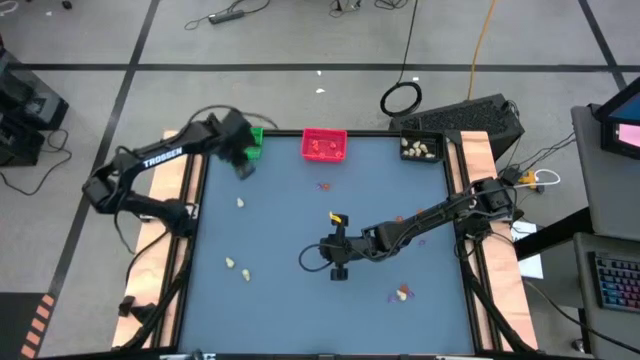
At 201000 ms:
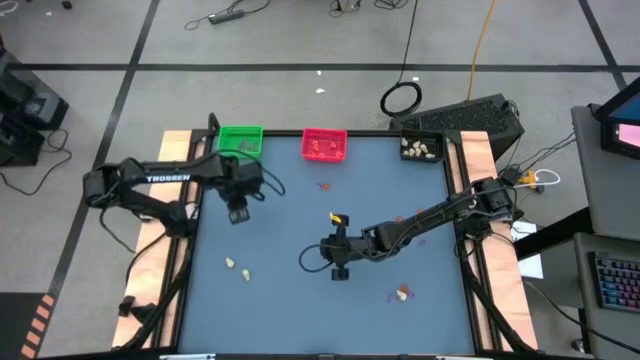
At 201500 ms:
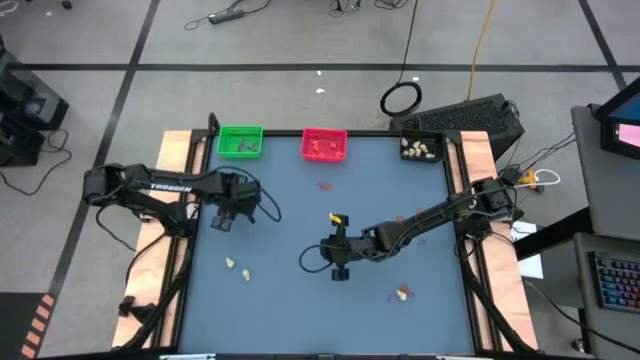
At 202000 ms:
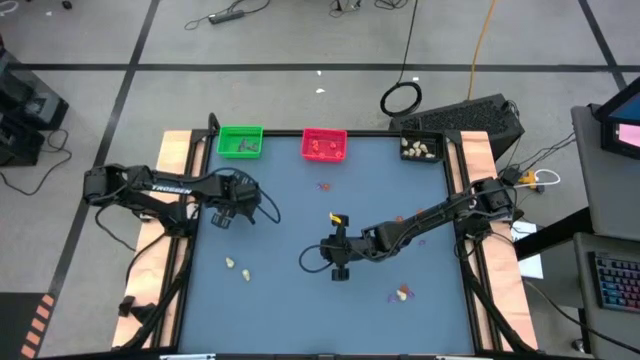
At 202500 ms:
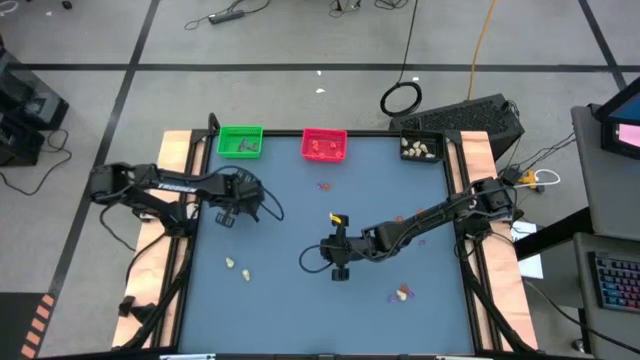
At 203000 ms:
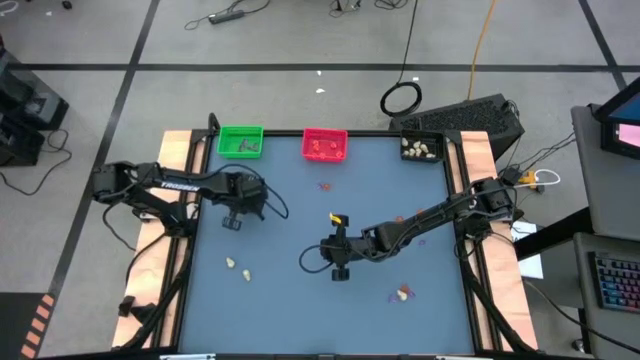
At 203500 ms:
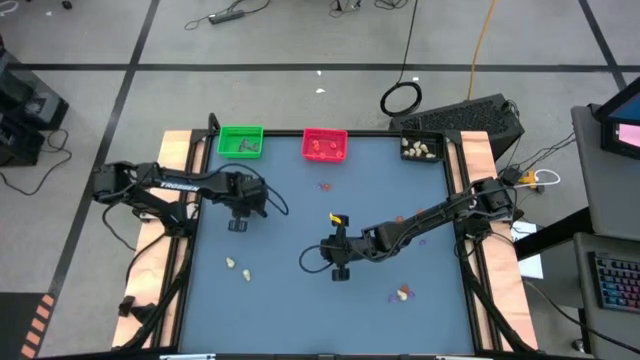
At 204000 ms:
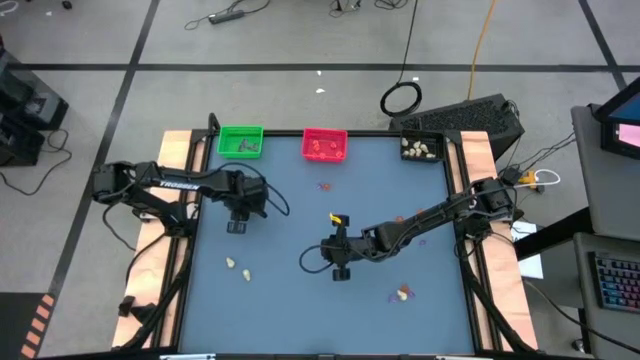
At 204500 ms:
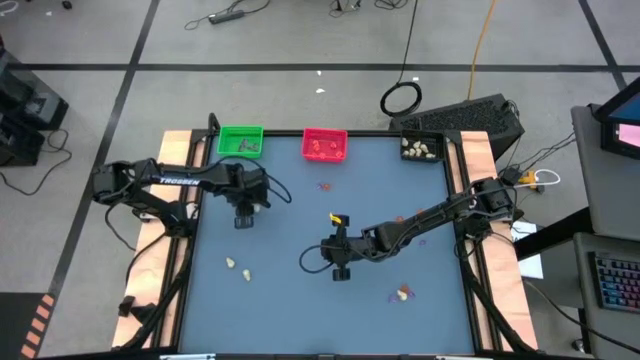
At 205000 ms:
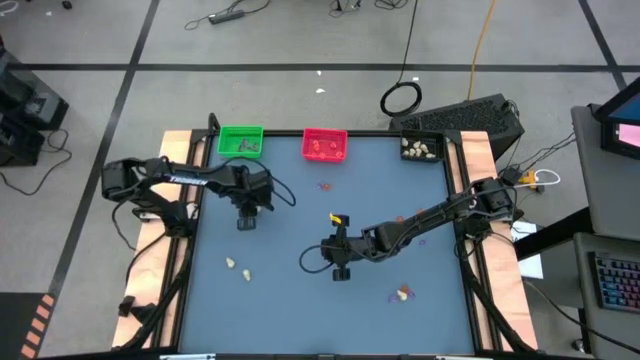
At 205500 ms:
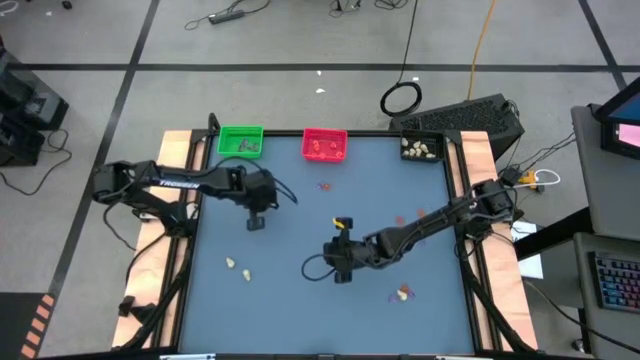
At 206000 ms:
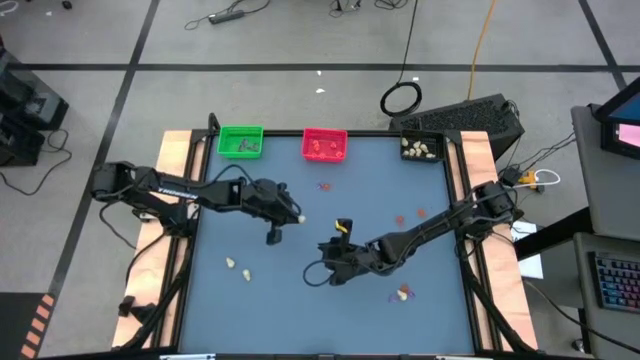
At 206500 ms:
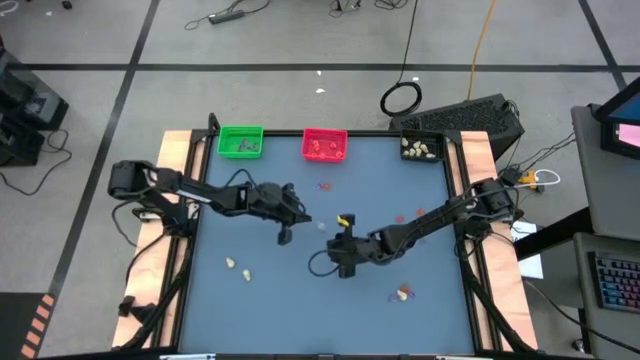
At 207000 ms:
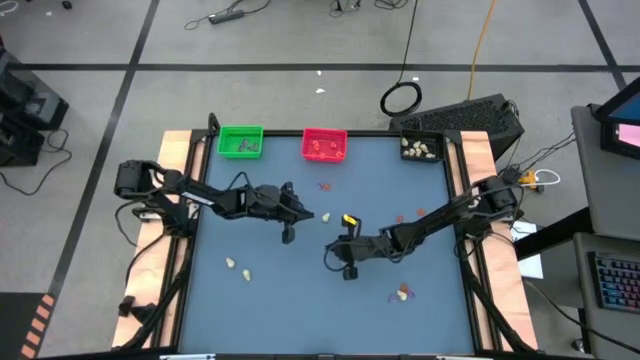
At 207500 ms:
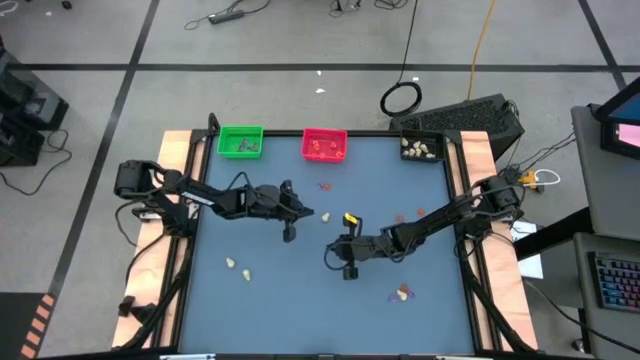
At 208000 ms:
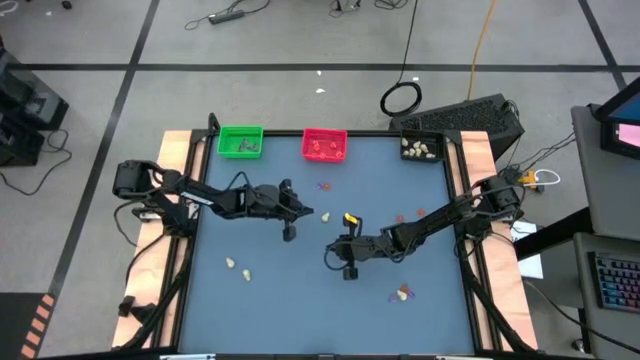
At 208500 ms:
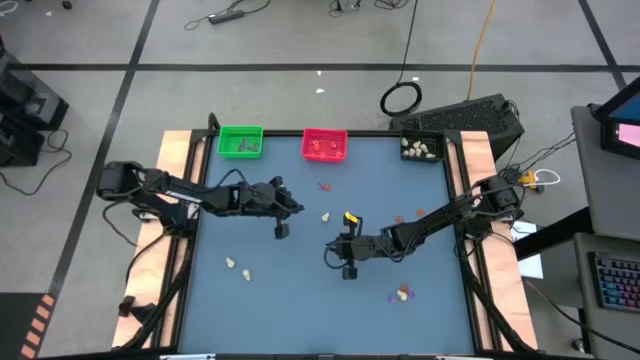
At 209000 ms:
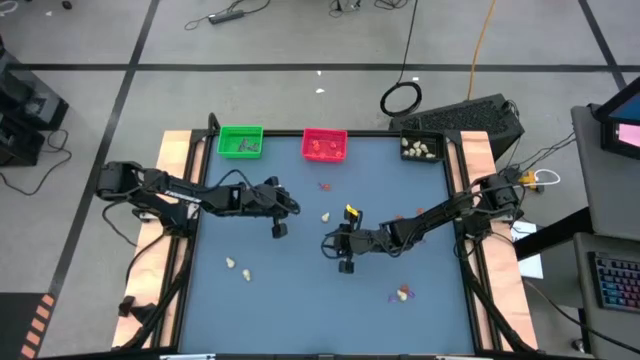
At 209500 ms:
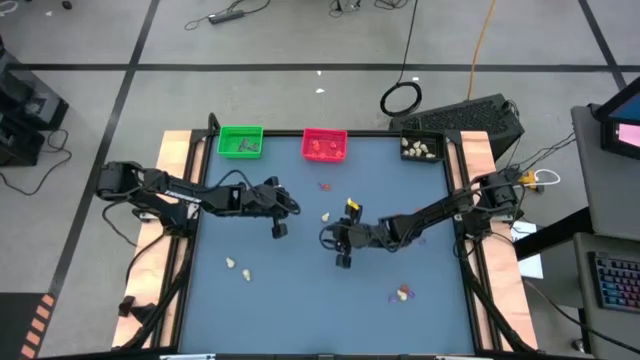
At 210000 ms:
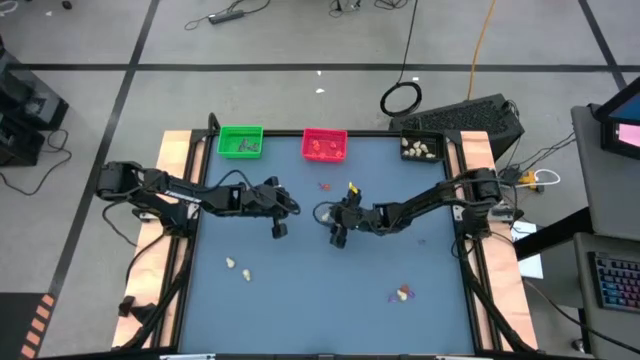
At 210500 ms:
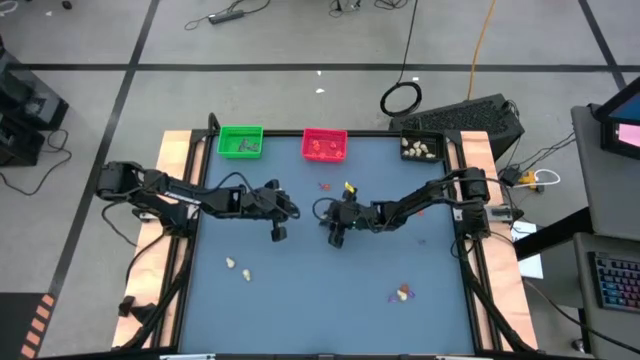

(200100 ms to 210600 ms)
Task: Sort Halloween decoration
Put the white skull toy into the black bin

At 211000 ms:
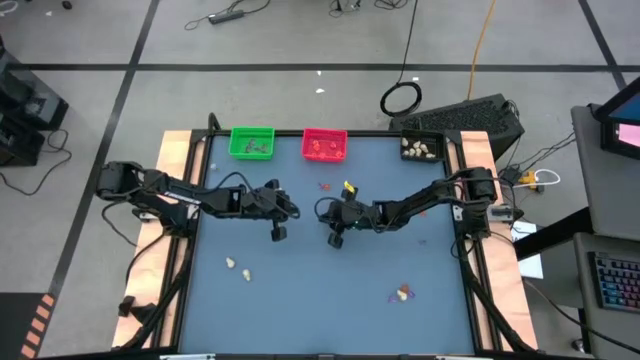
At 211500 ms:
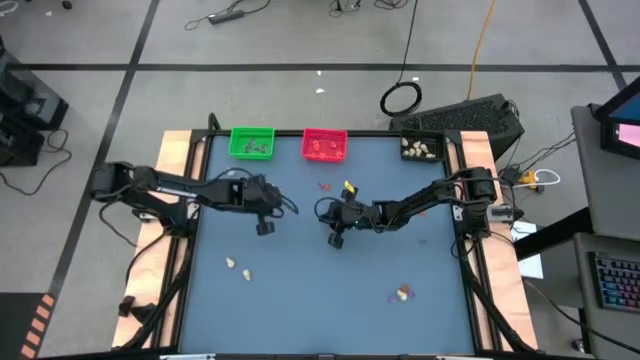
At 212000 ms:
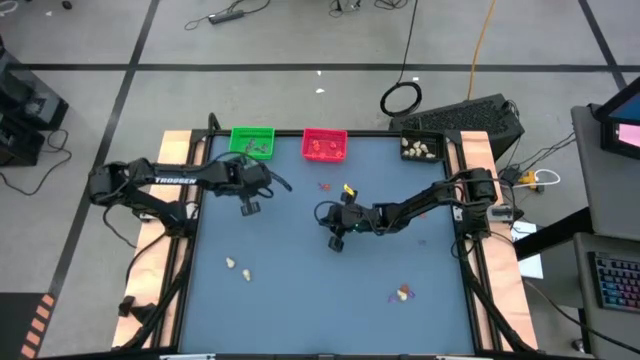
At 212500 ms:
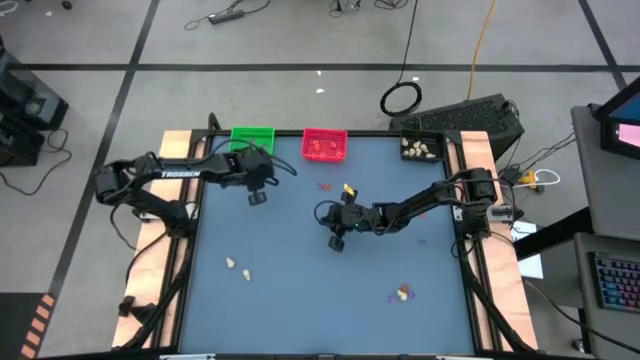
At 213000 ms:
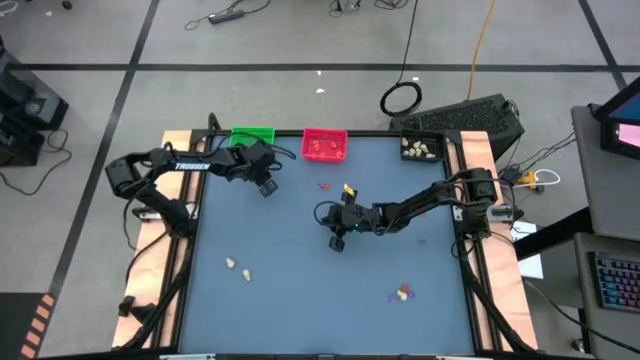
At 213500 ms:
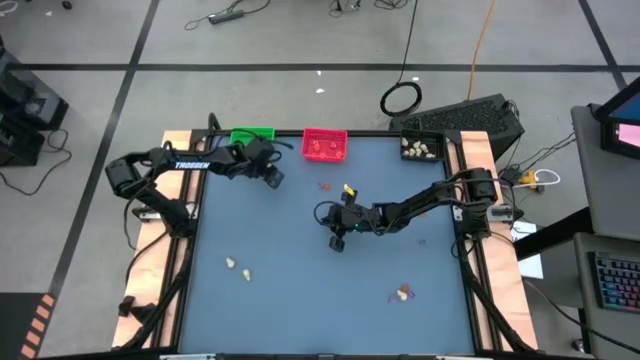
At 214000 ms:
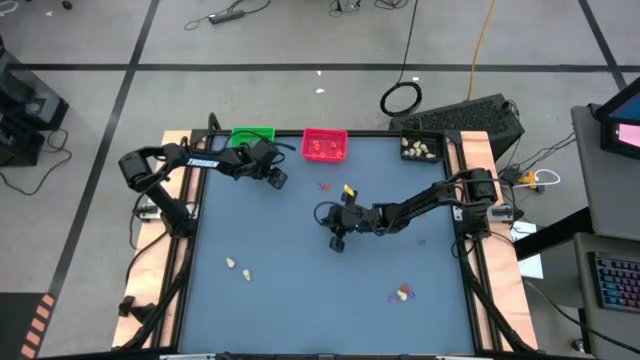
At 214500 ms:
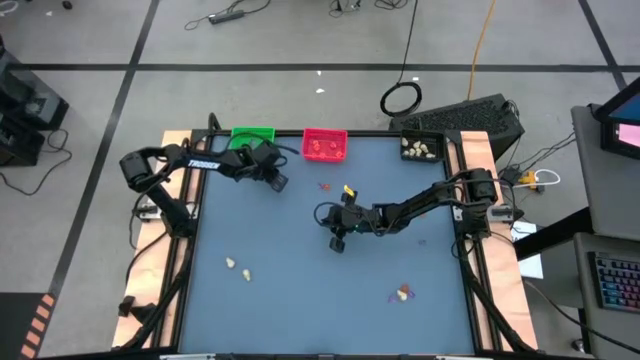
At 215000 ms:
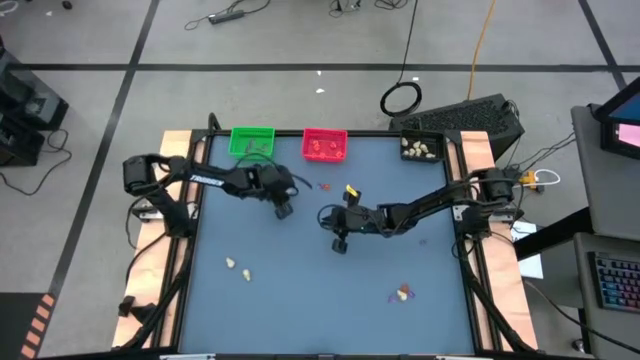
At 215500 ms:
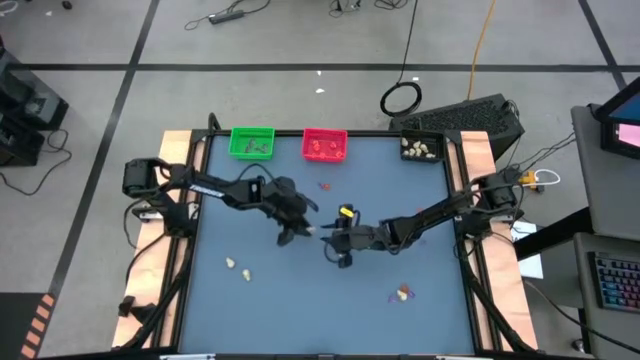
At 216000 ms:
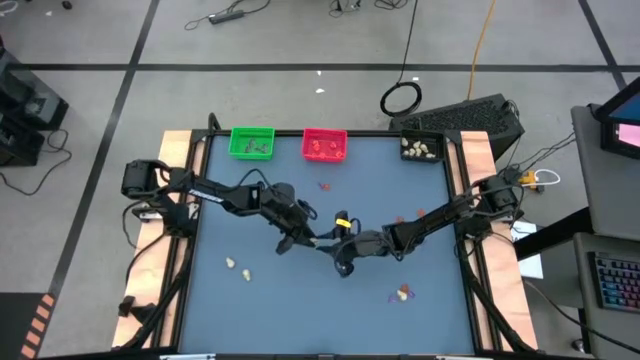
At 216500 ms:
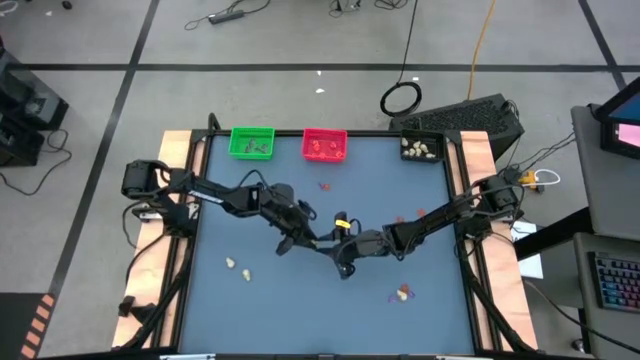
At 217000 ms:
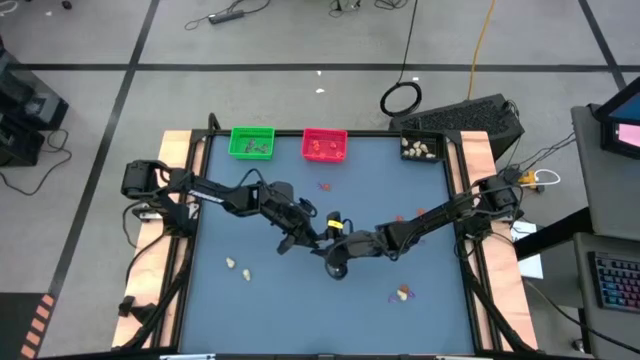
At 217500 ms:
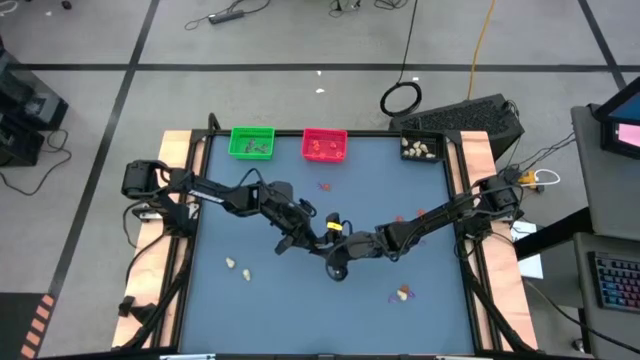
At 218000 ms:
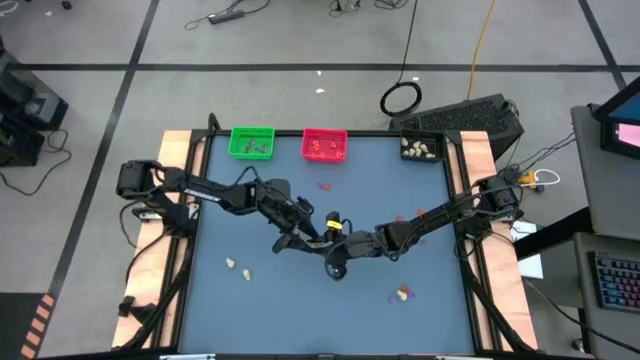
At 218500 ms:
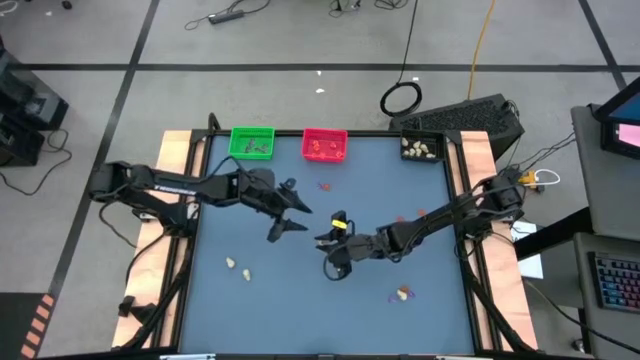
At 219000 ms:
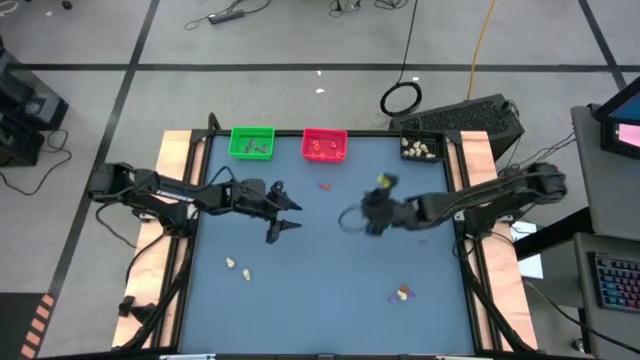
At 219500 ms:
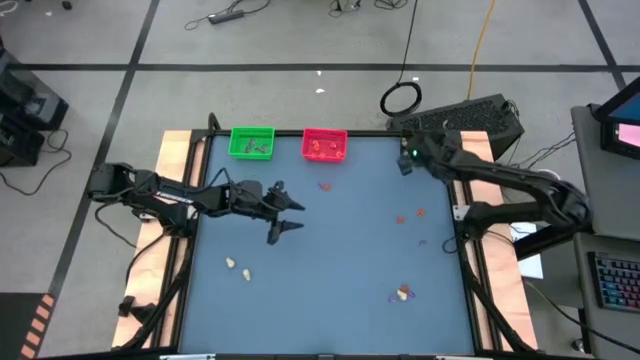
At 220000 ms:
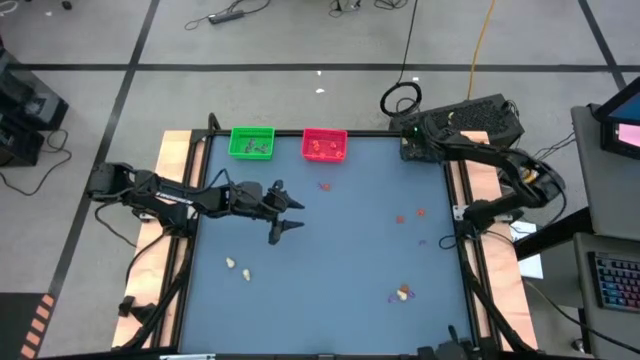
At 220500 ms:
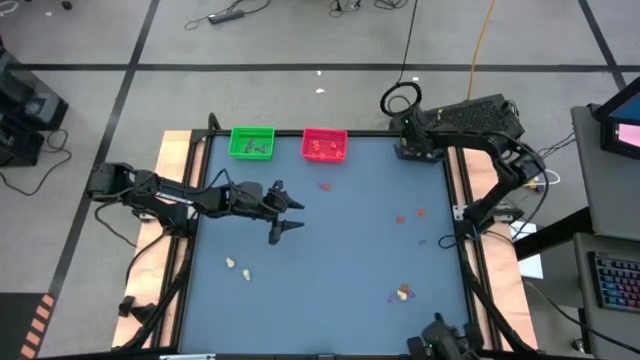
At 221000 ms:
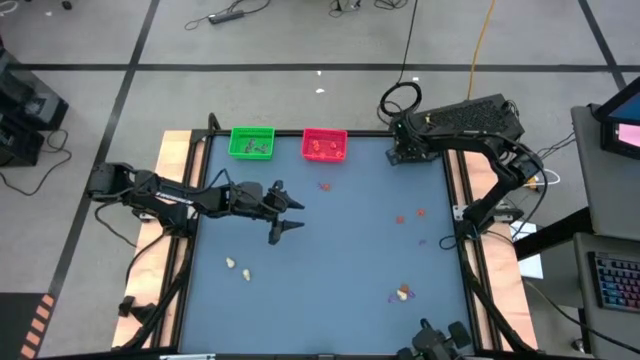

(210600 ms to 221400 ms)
Put the white skull toy into the black bin

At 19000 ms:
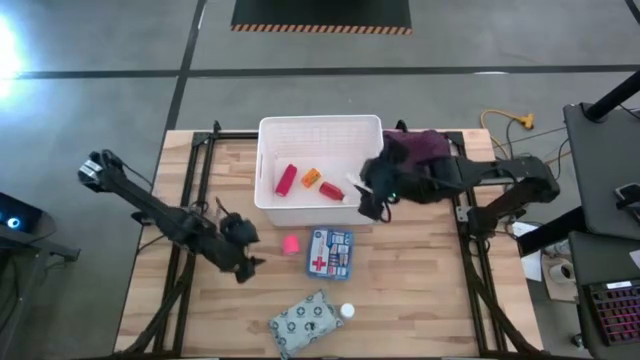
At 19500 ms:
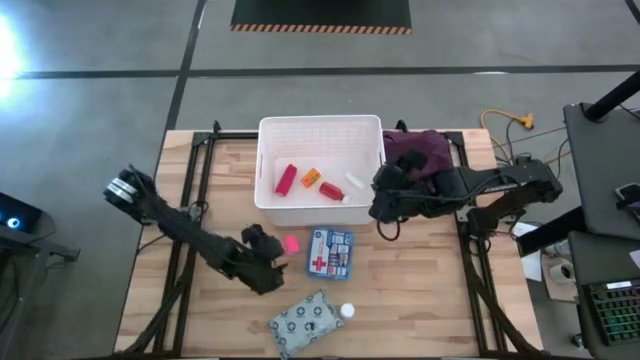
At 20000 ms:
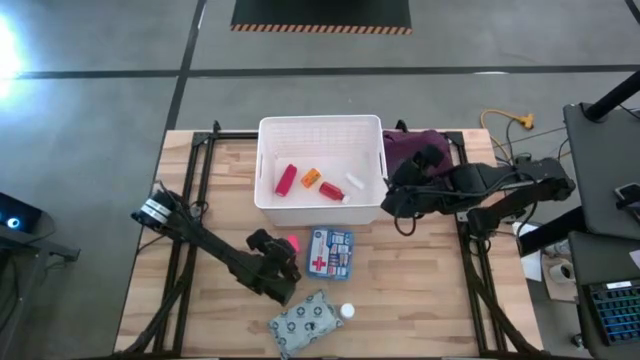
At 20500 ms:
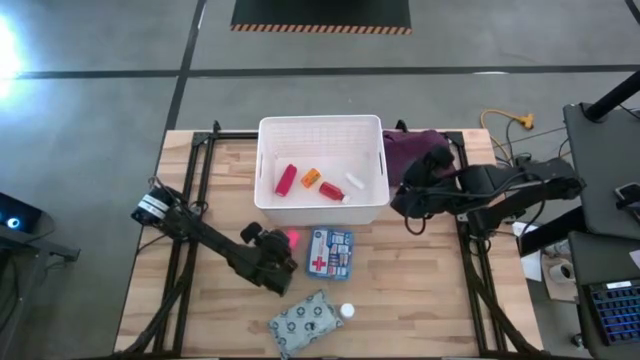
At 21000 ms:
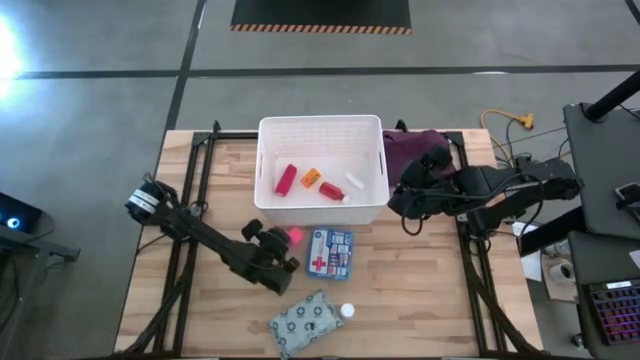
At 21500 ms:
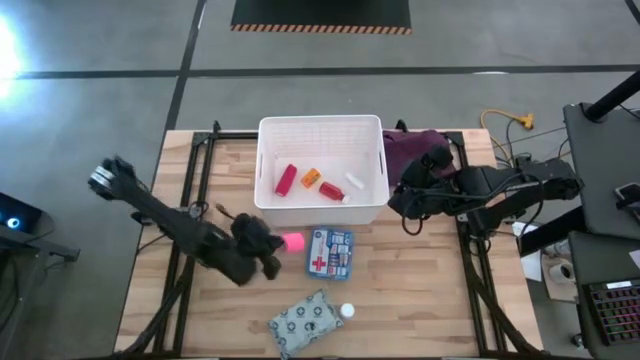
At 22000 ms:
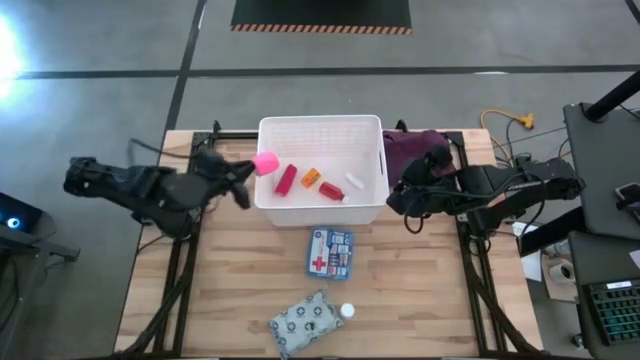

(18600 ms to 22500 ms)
Task: Pick & place medical supplies in basket/bin
Put the pink bandage into the white bin
